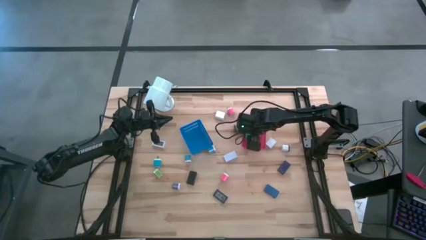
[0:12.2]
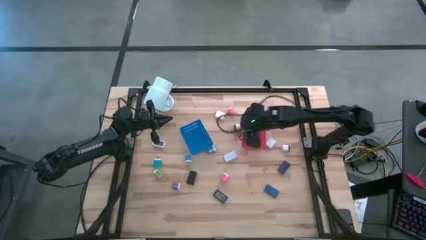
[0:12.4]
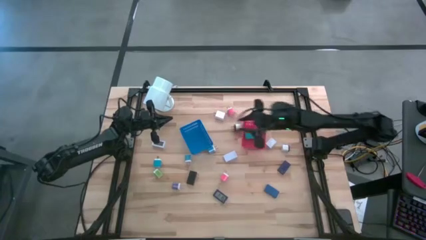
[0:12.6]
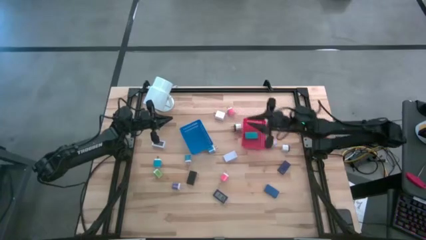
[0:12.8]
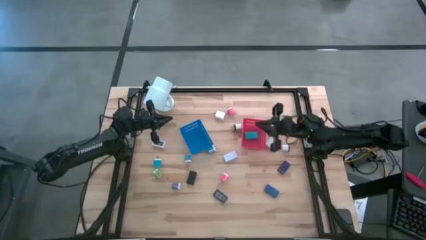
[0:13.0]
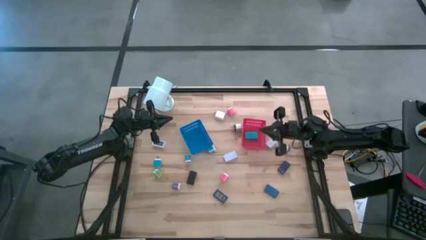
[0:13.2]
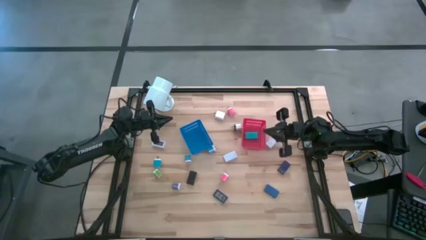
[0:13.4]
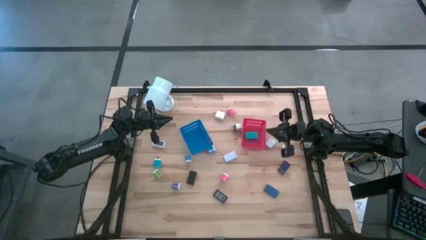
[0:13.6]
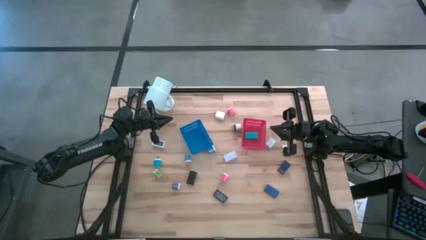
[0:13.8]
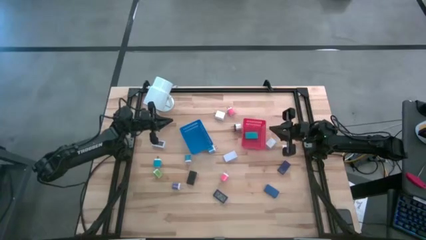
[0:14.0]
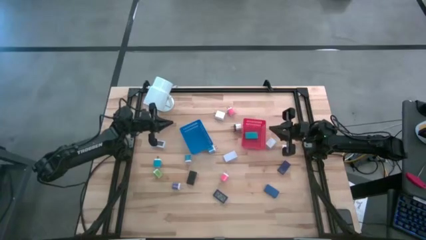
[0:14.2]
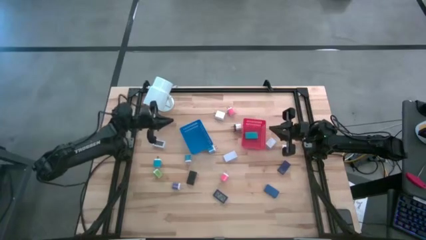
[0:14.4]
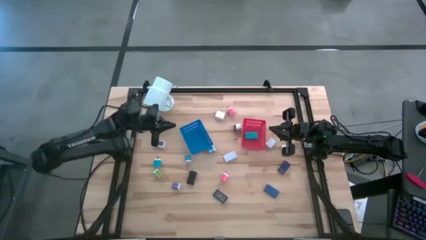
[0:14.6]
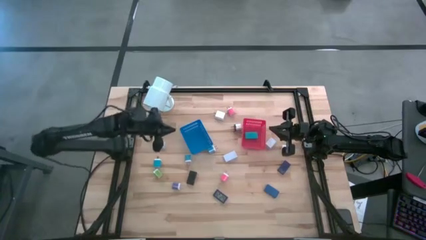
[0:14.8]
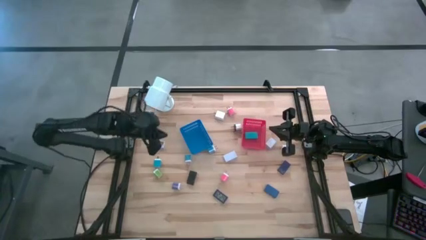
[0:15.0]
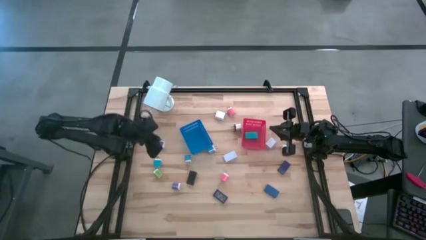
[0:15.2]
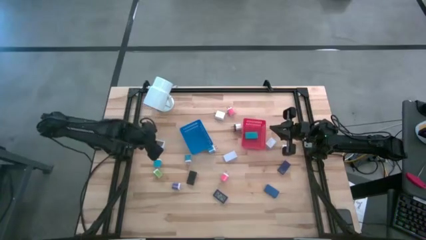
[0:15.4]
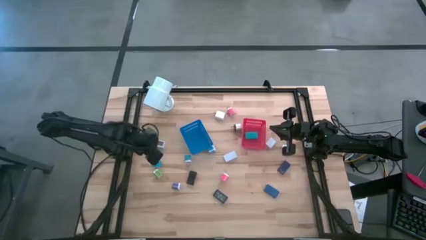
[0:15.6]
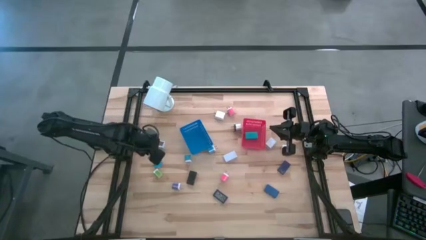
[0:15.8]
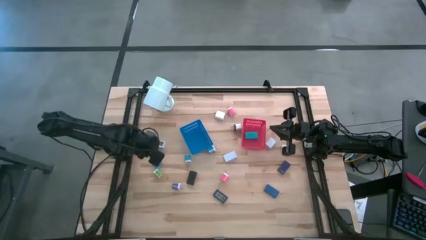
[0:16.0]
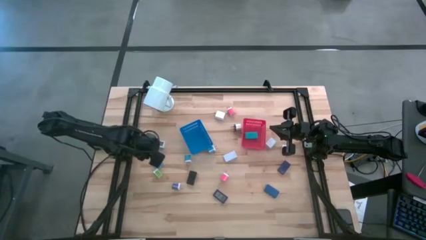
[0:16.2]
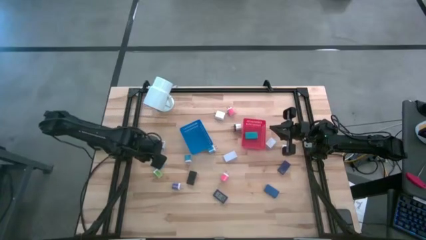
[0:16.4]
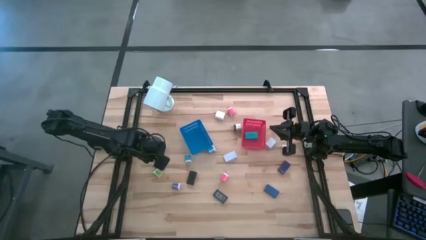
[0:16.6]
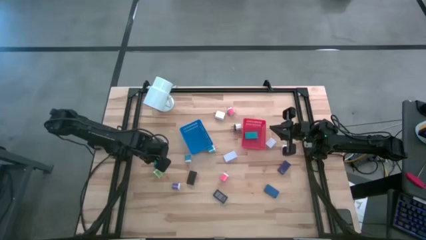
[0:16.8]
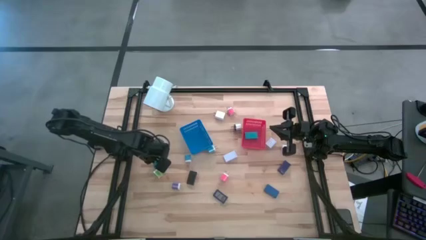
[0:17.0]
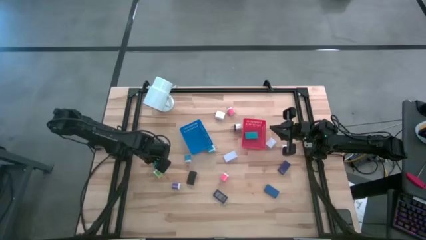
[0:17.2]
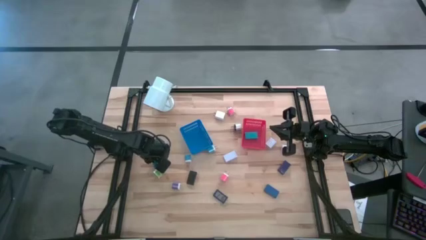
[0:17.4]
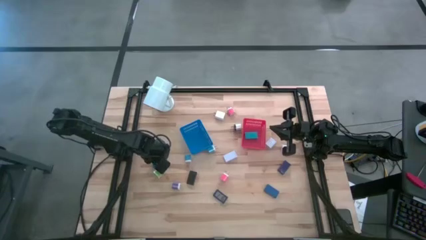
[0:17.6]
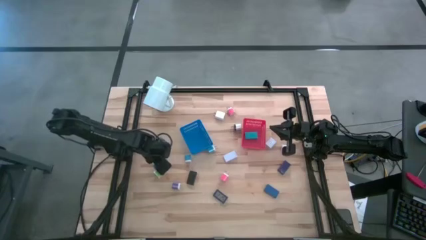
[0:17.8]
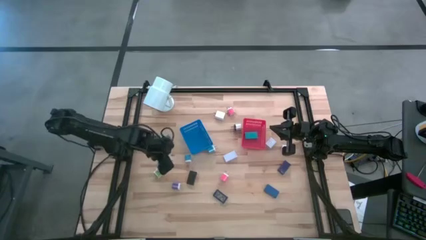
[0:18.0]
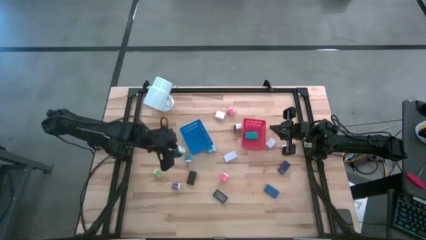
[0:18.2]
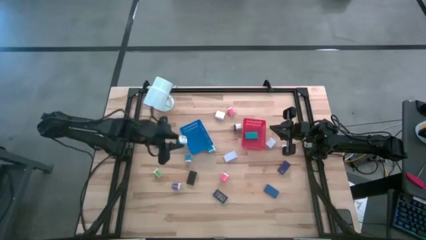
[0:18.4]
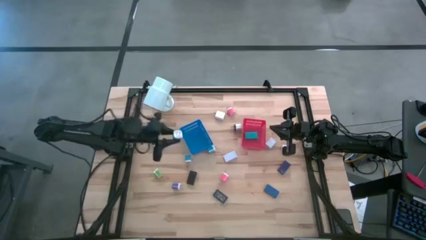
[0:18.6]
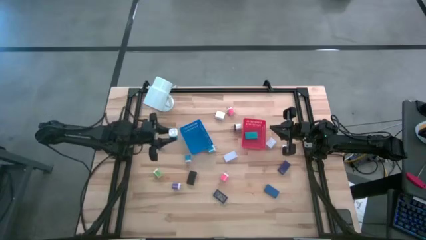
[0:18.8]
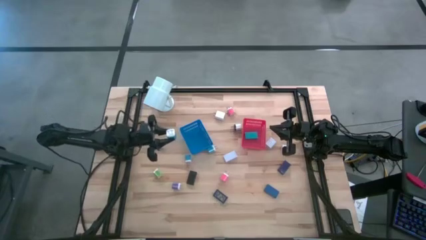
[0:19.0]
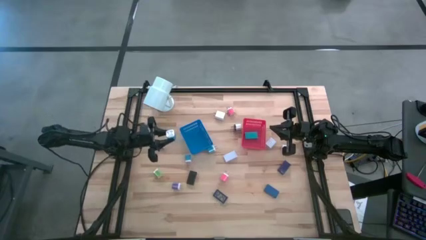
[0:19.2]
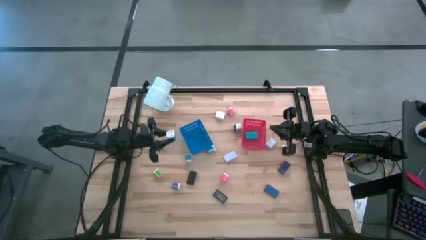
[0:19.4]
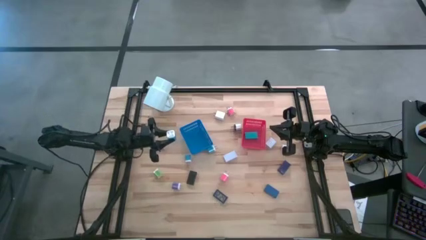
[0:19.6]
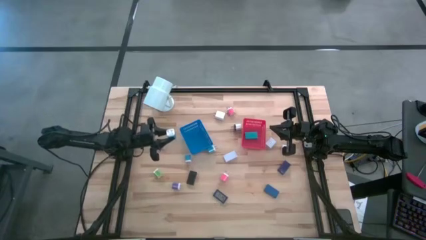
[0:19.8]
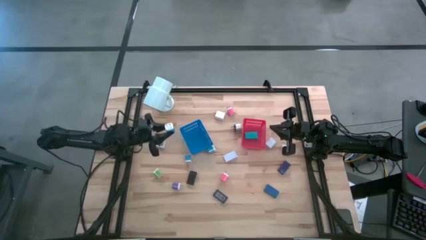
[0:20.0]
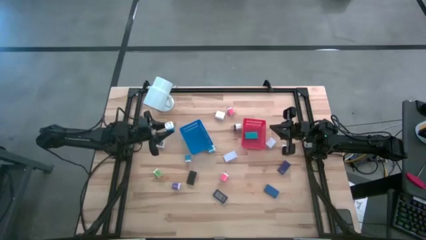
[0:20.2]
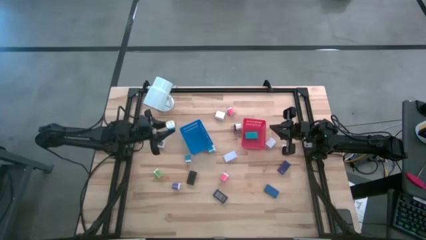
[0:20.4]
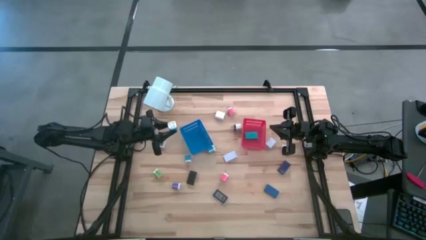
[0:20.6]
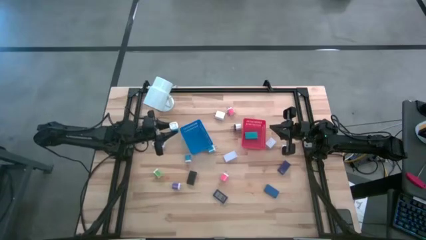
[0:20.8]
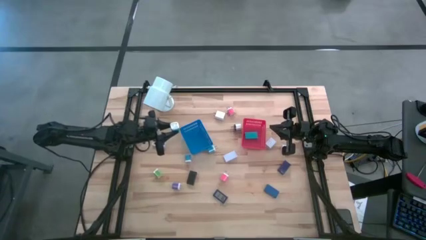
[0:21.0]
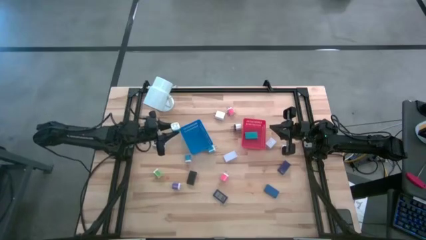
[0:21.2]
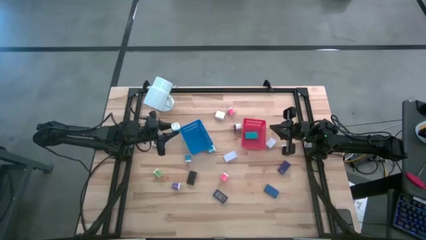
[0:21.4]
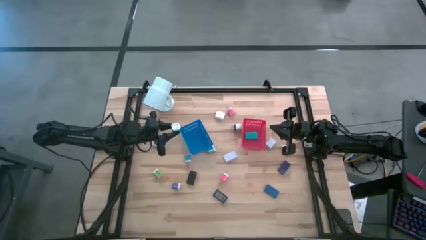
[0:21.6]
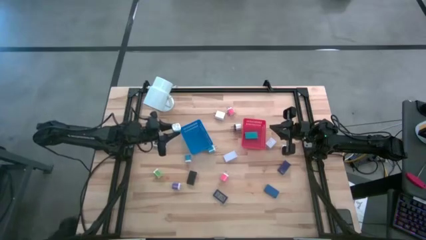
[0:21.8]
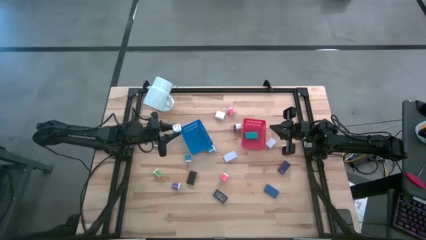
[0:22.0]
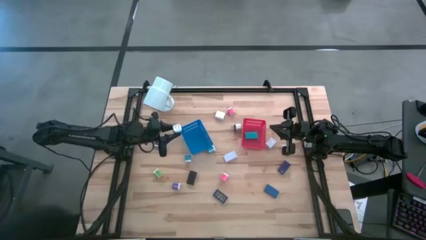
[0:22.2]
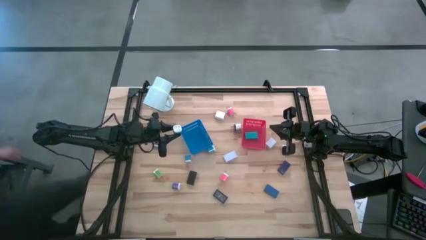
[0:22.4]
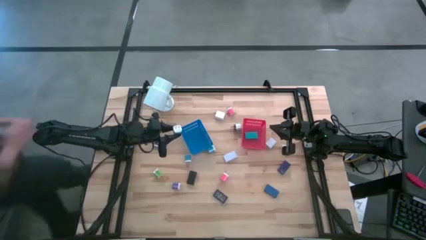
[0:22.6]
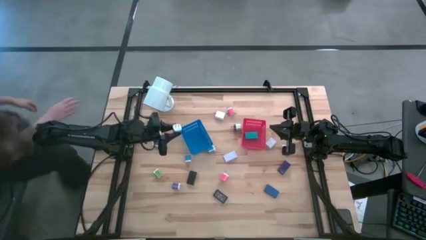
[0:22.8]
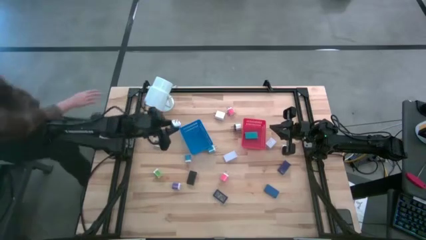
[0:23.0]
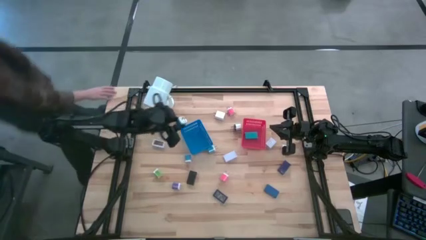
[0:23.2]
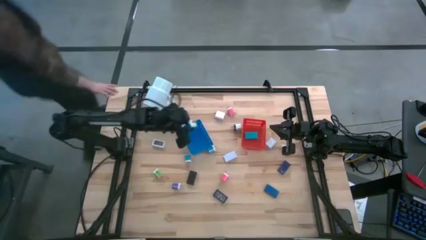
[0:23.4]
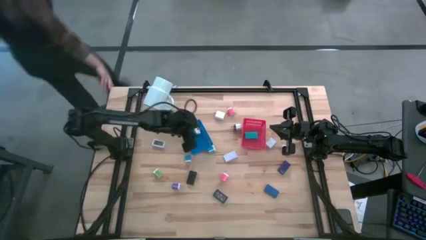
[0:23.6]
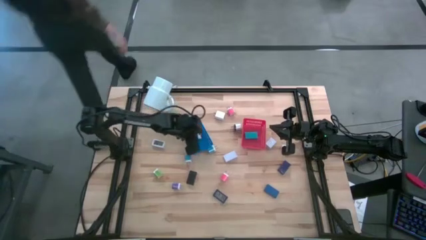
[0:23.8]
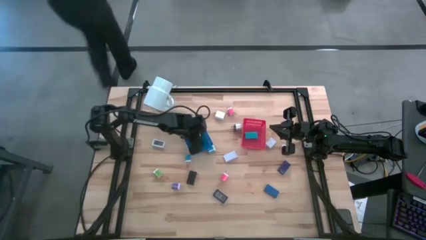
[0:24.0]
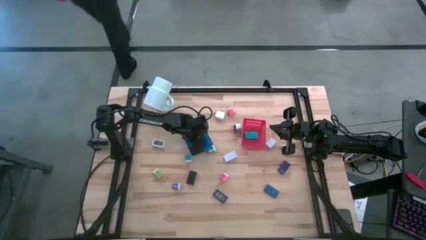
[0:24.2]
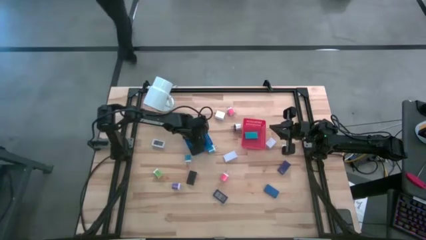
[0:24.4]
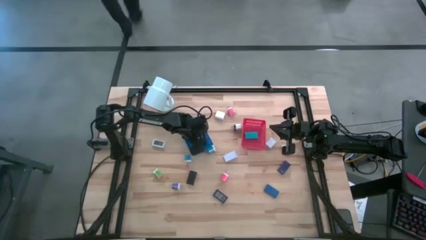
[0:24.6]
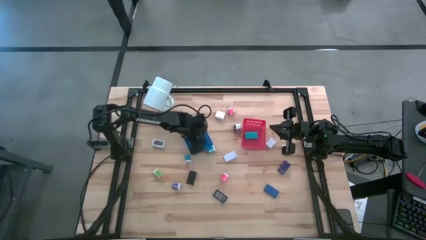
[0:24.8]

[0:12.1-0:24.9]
Task: Pick & Place Office items
Put the left blue charger adapter into the blue bin
